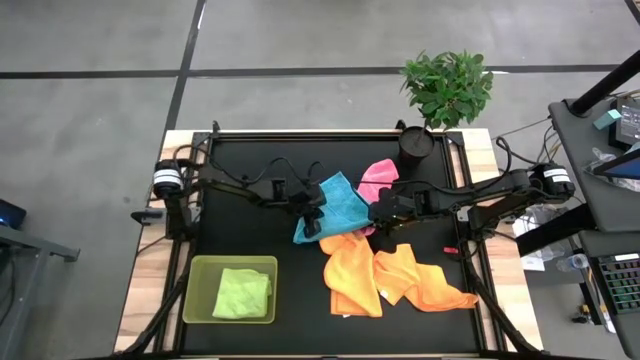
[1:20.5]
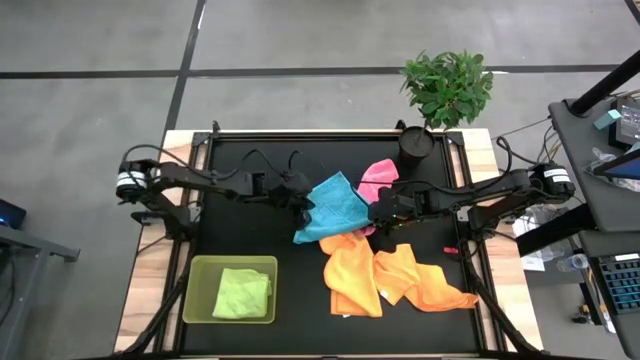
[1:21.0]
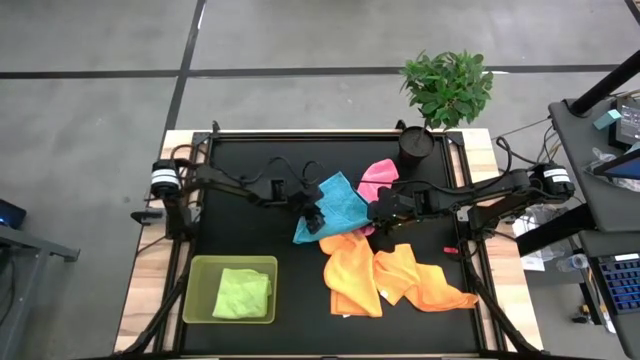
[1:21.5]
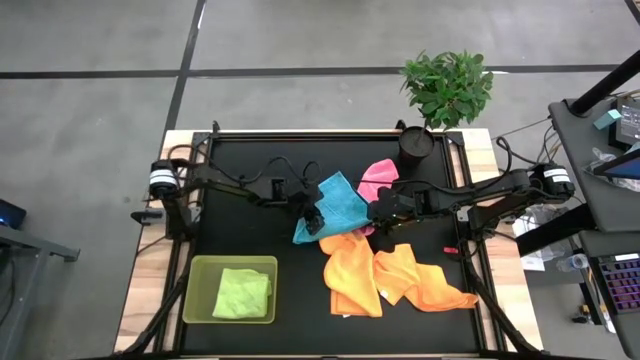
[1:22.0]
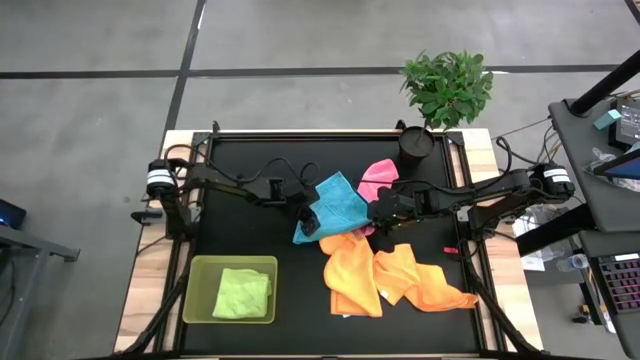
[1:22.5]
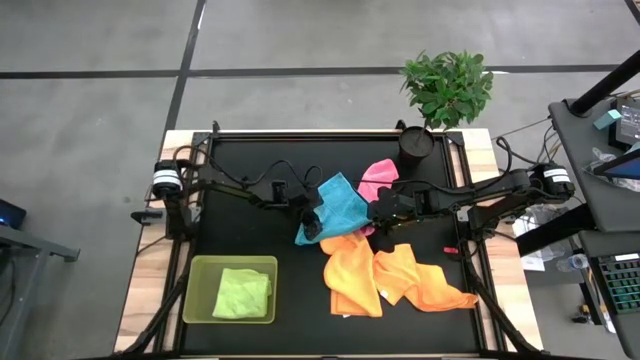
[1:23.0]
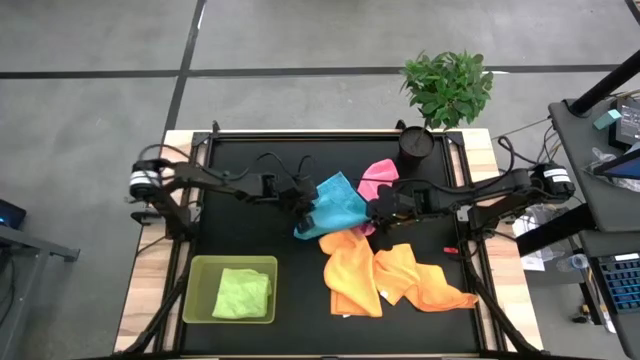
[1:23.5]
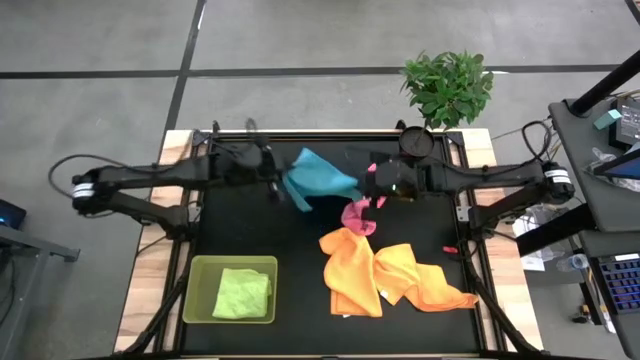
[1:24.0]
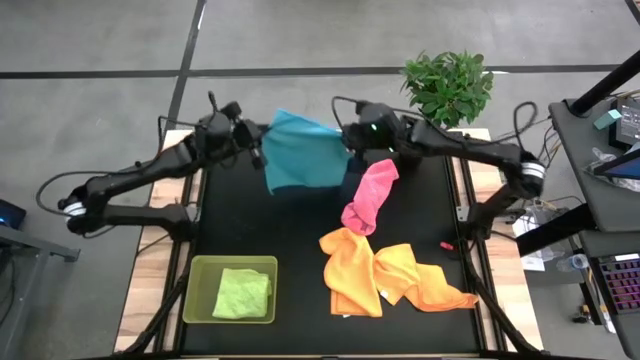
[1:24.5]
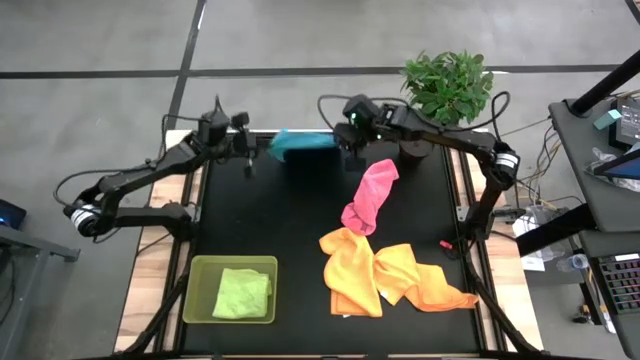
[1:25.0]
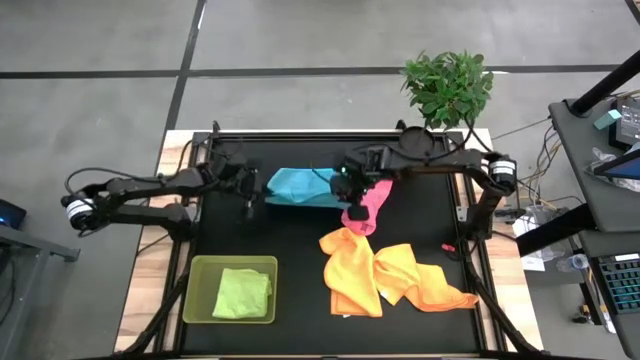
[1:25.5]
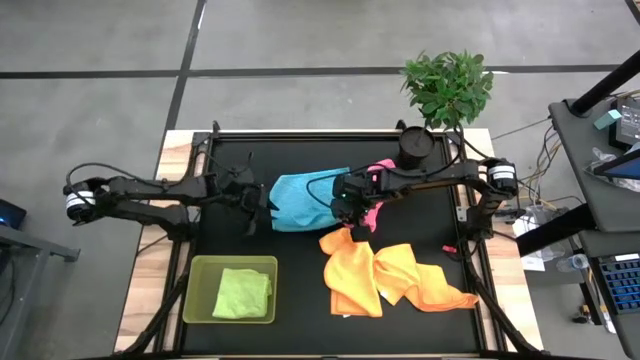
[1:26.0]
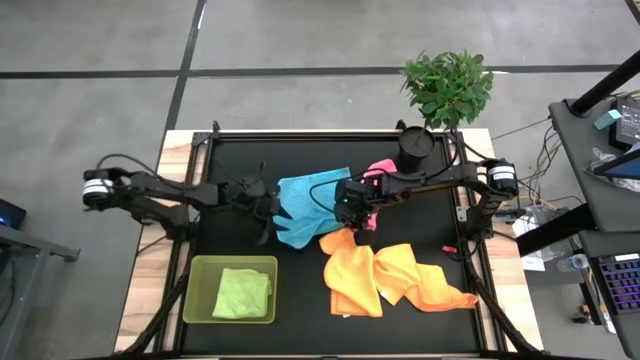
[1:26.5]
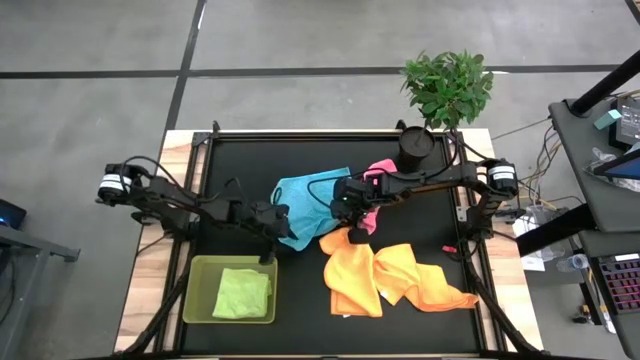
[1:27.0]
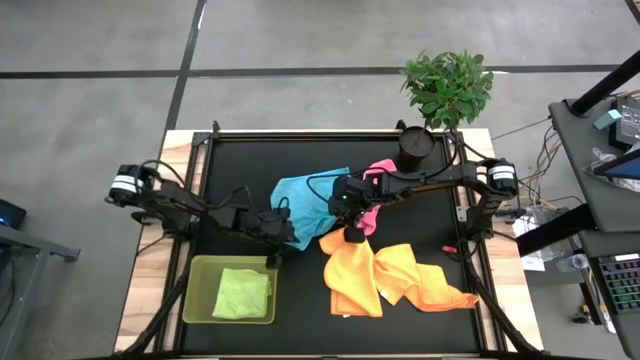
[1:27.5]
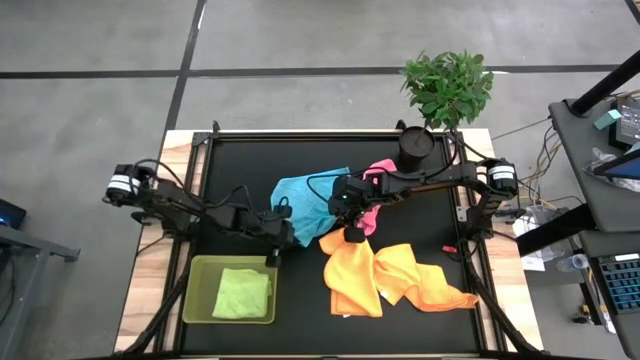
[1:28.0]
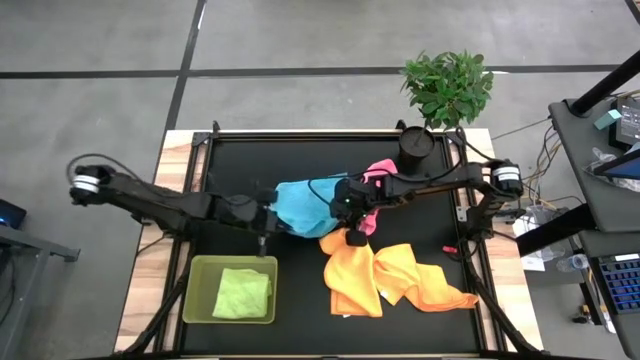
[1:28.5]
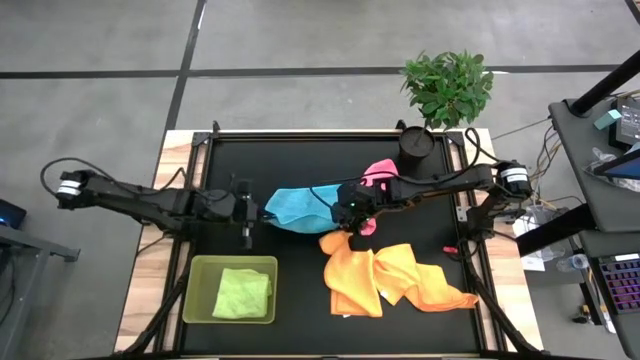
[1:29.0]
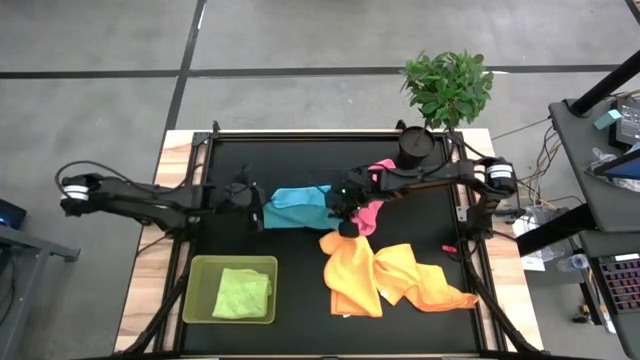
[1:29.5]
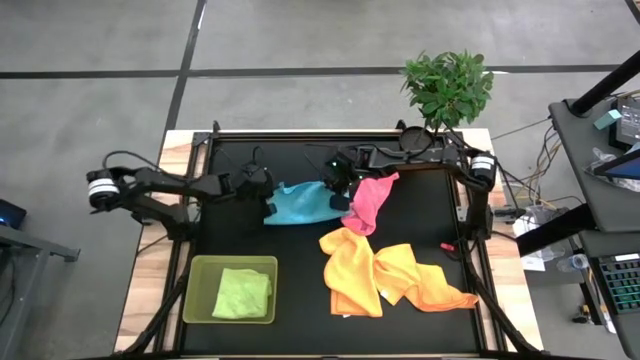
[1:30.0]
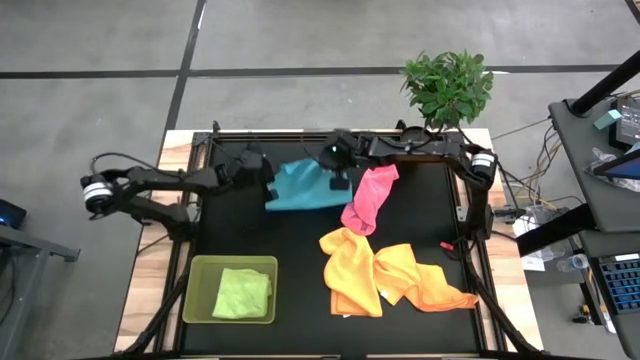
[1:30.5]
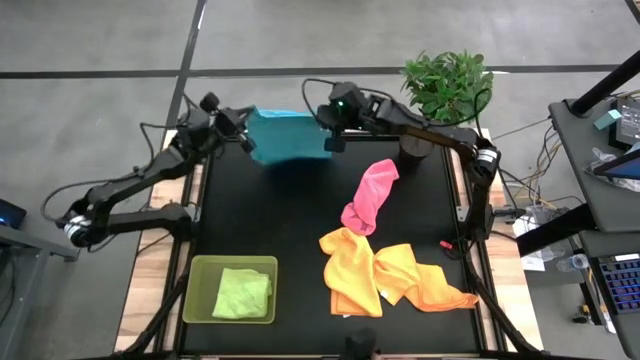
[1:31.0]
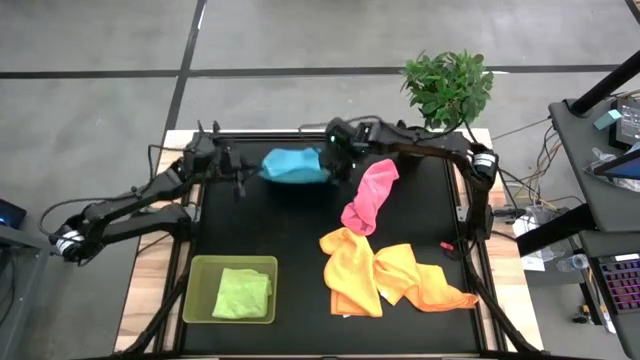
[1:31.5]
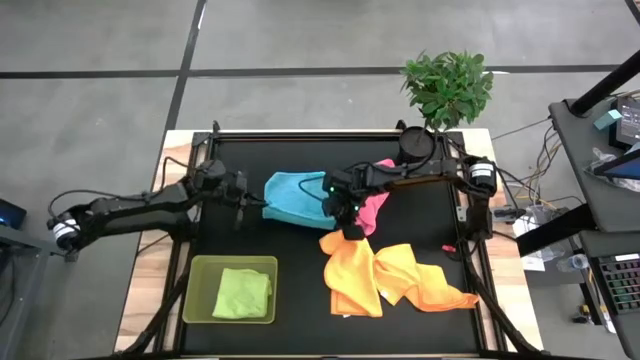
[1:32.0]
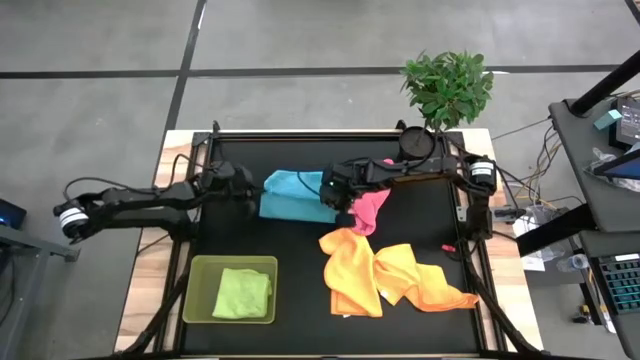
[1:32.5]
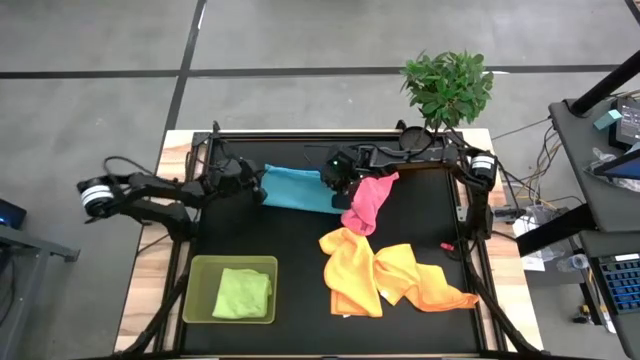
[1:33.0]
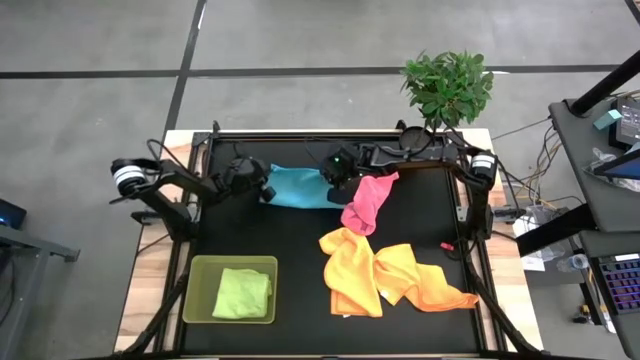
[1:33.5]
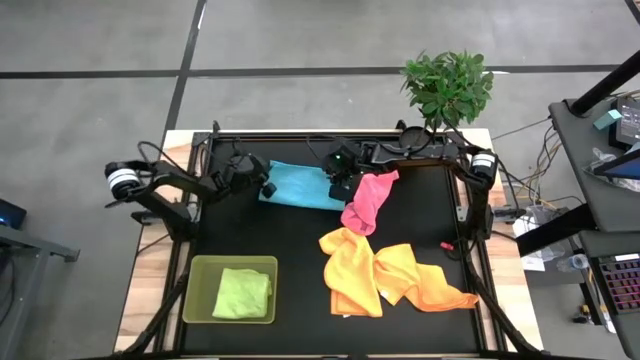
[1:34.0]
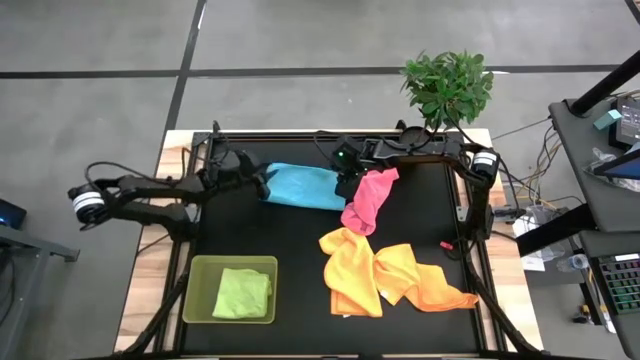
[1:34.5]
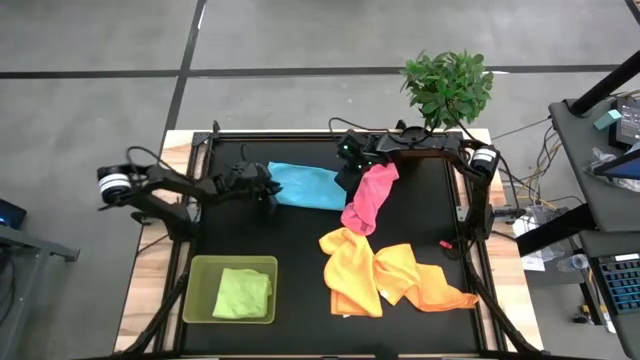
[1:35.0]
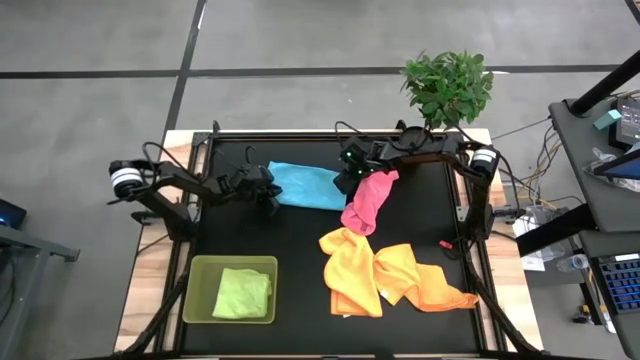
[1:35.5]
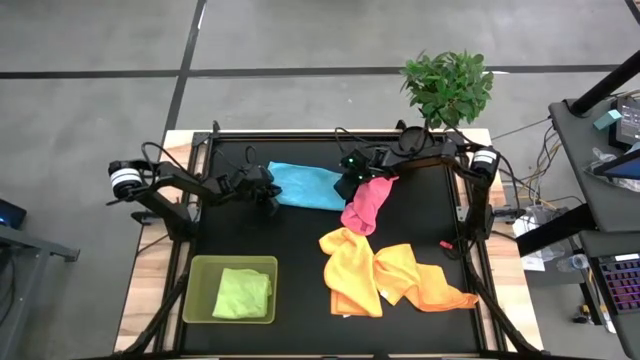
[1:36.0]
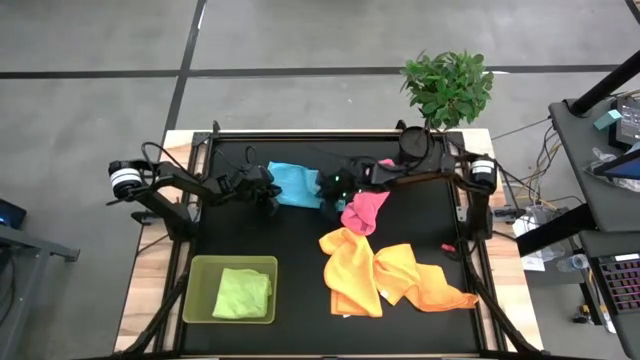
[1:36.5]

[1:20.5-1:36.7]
Task: Fold microfiber towels
Fold the blue microfiber towel

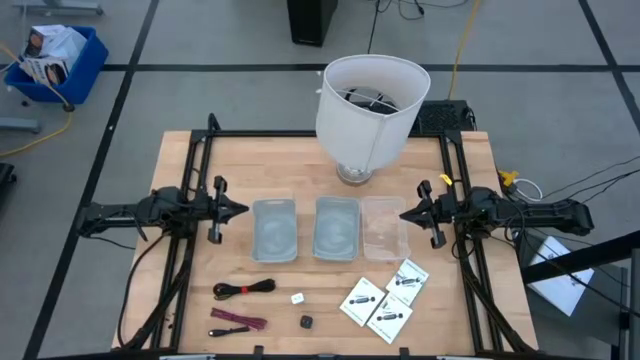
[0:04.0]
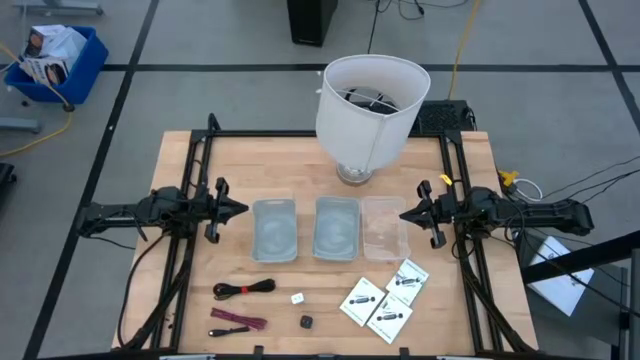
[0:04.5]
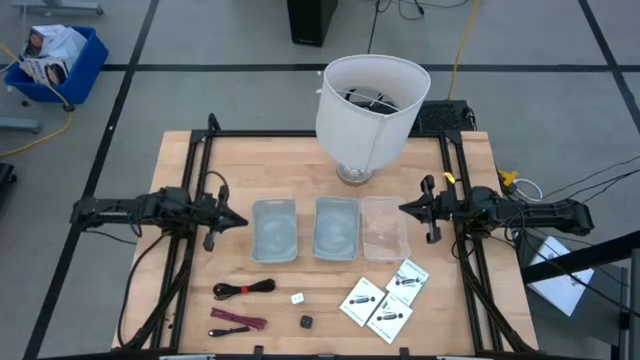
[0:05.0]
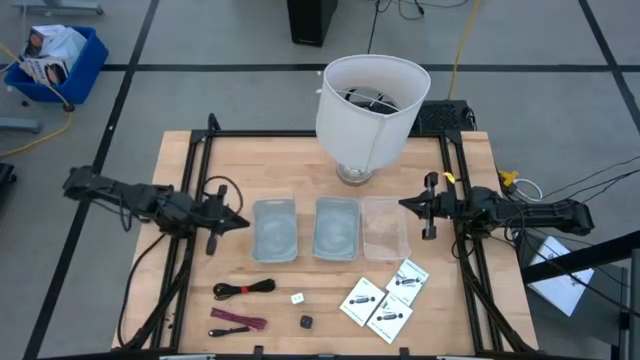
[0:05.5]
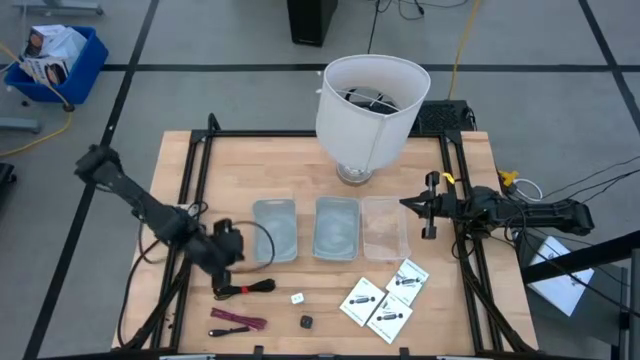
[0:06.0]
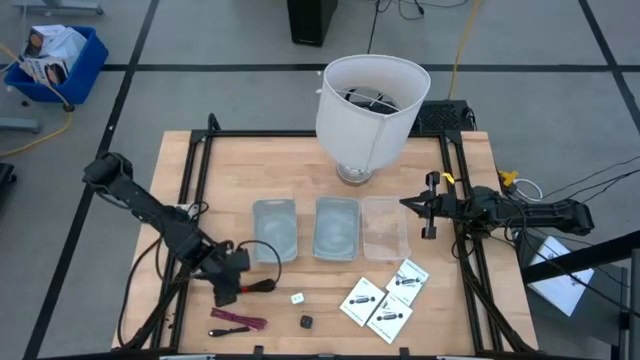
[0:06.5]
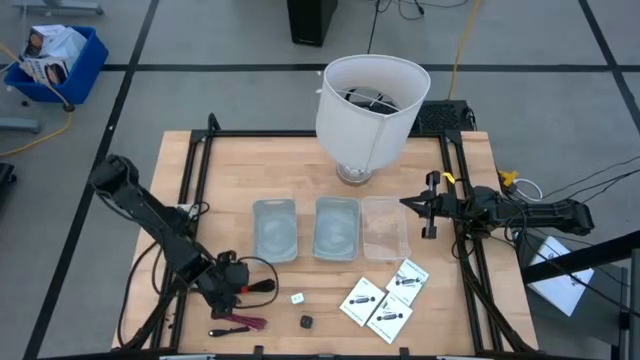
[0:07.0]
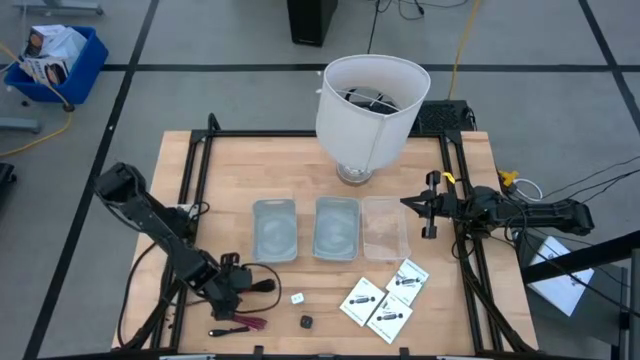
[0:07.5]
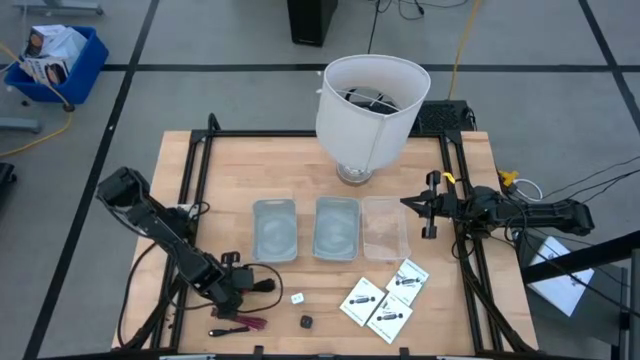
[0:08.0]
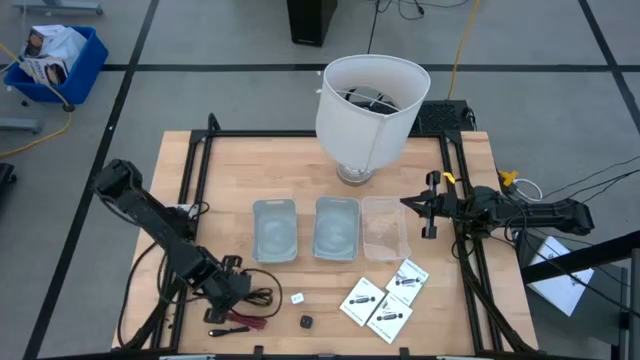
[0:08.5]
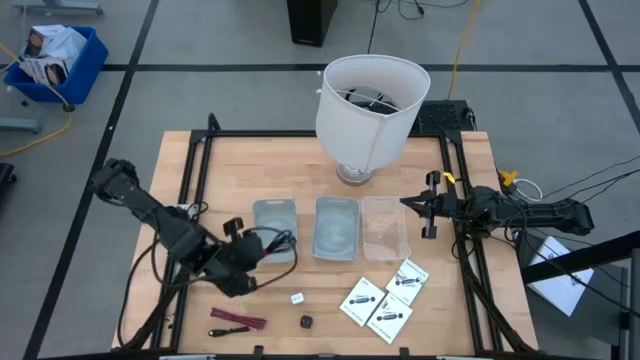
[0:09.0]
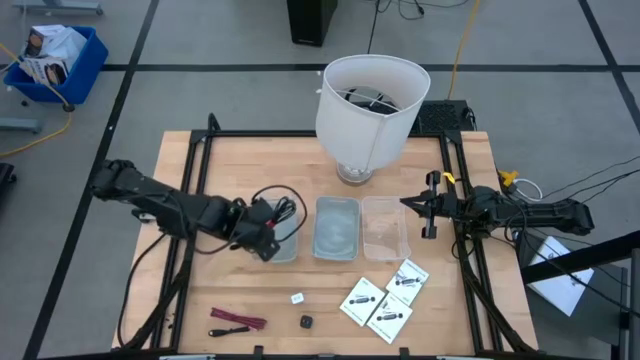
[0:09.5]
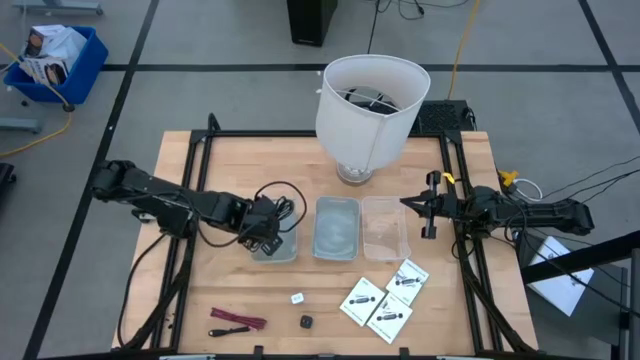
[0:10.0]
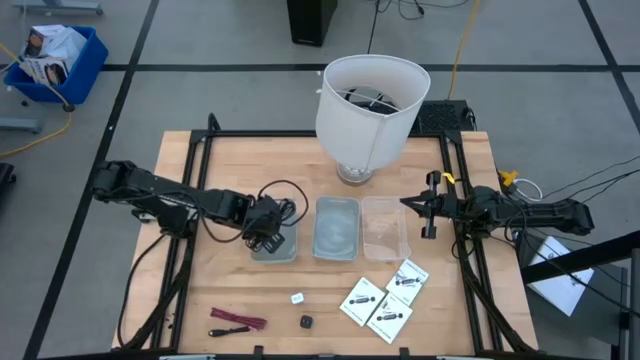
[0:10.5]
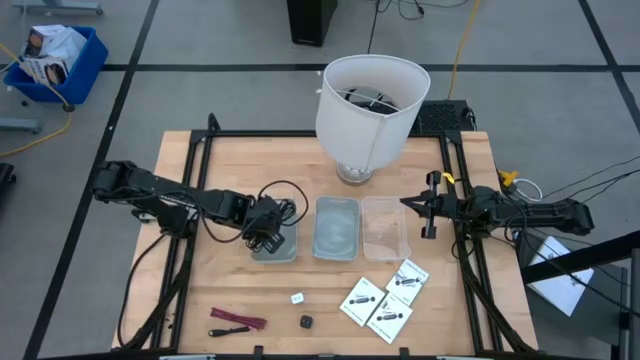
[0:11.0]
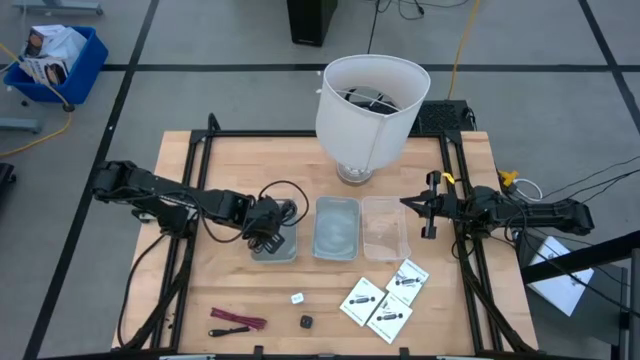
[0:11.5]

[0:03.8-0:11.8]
Task: Pick and place items into bin
Put the top black charger cable into the left gray bin
